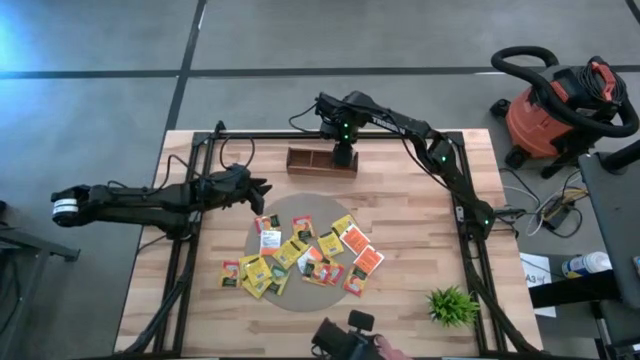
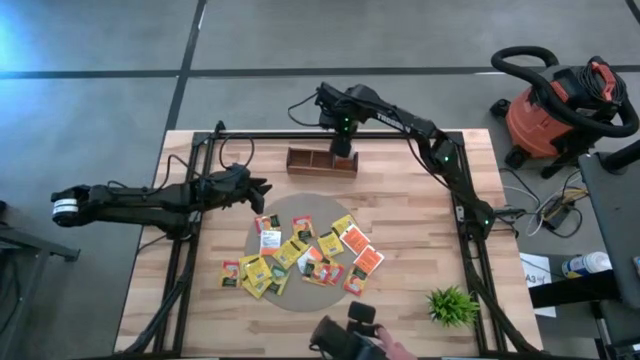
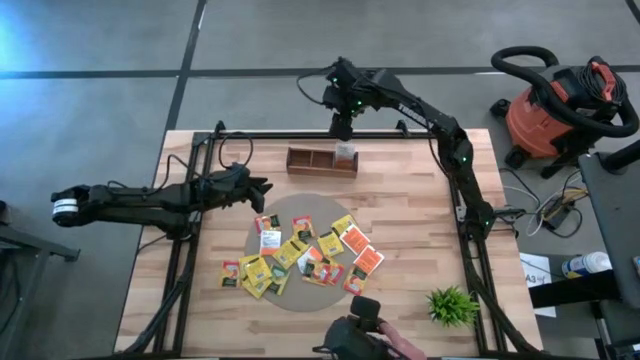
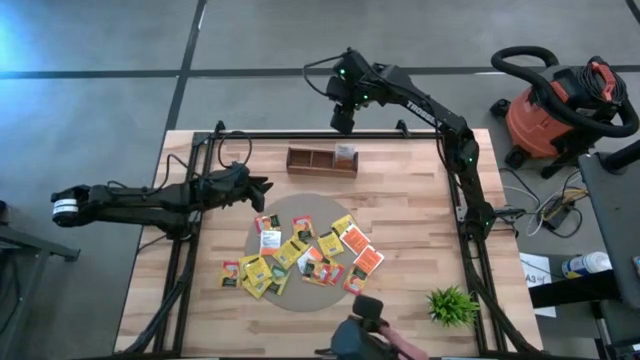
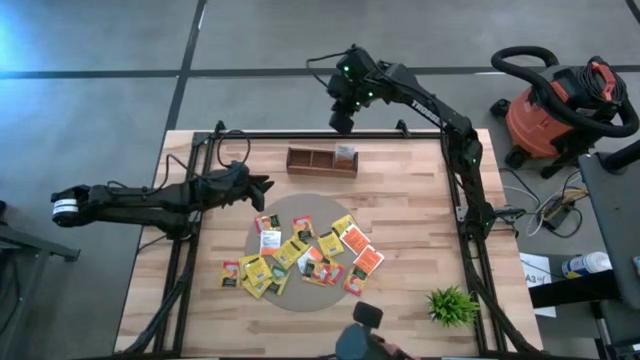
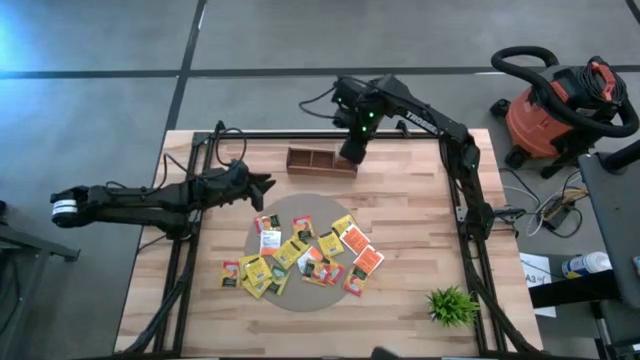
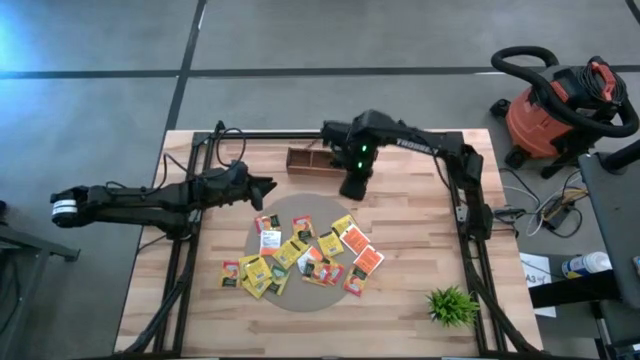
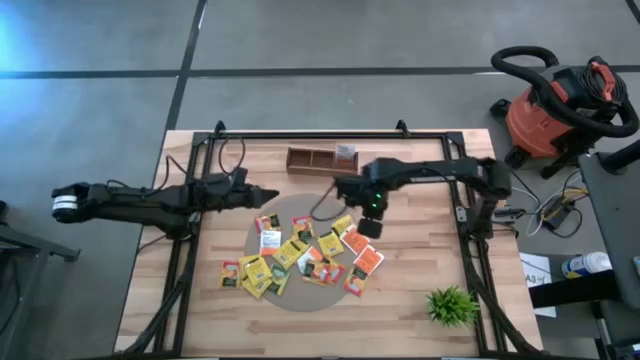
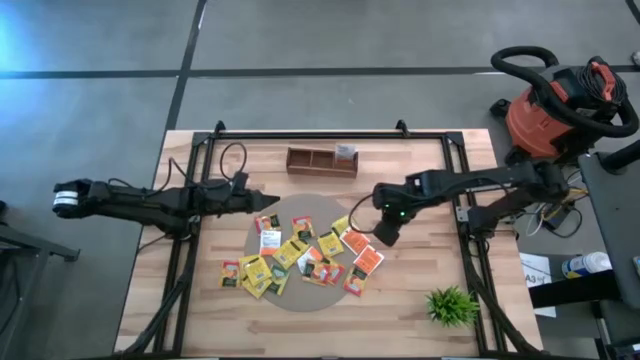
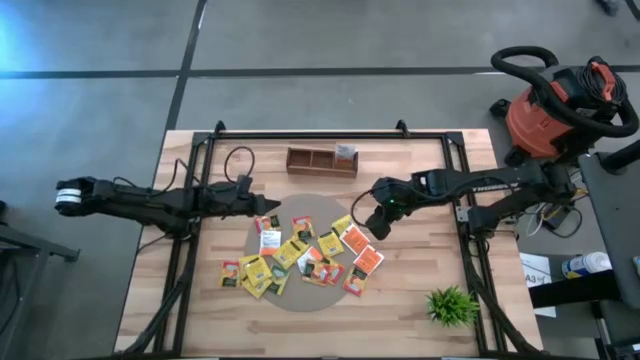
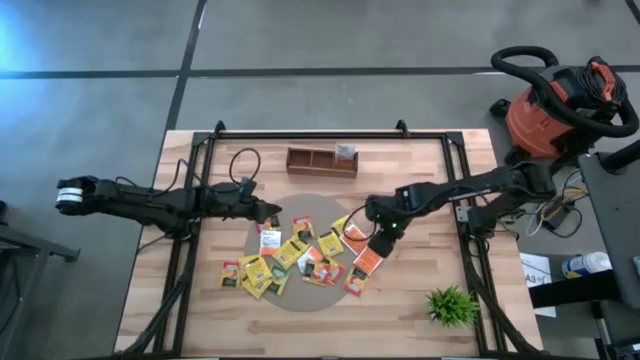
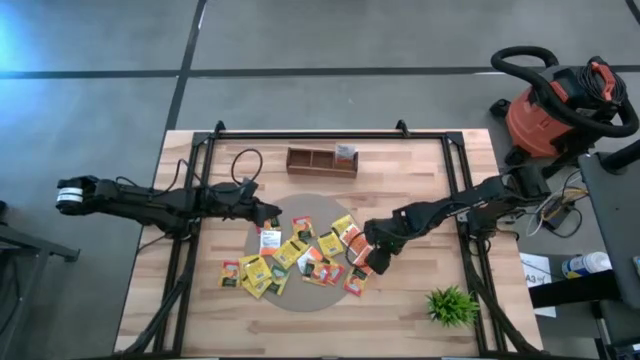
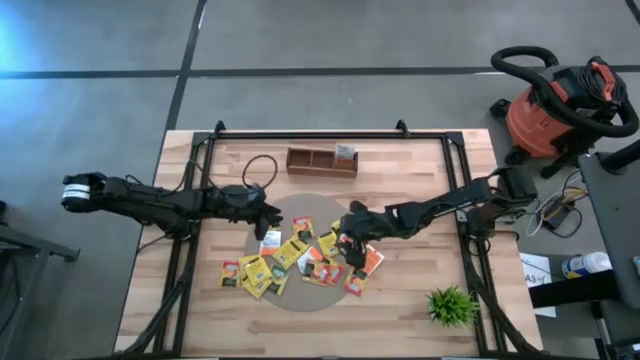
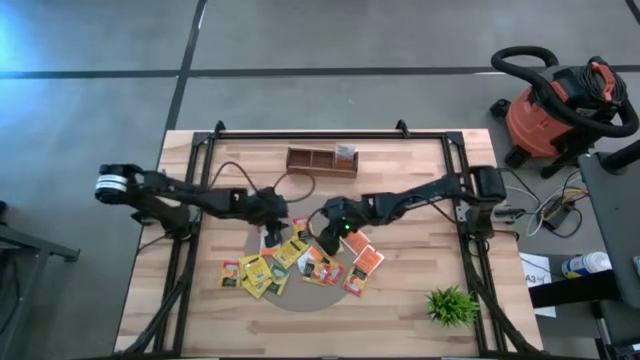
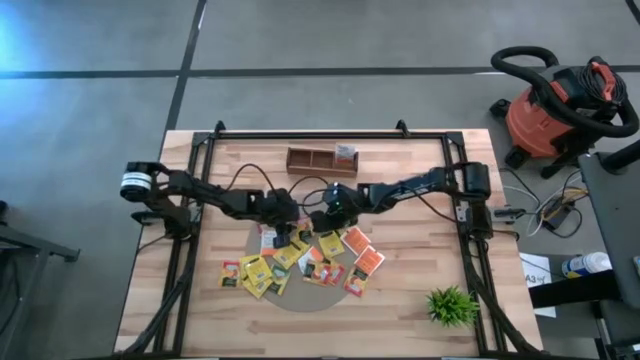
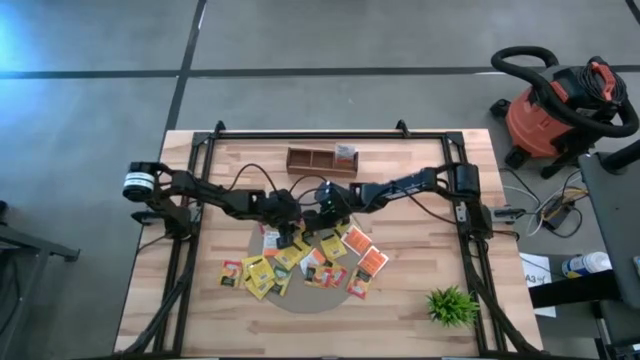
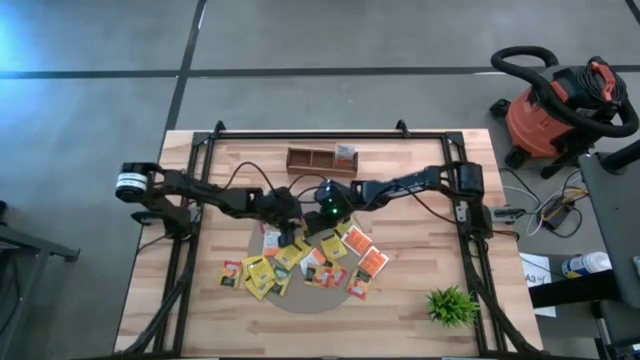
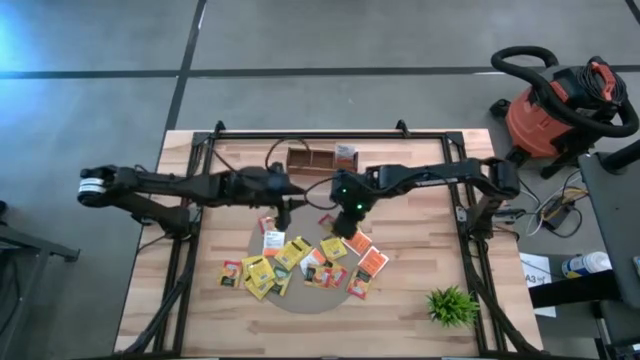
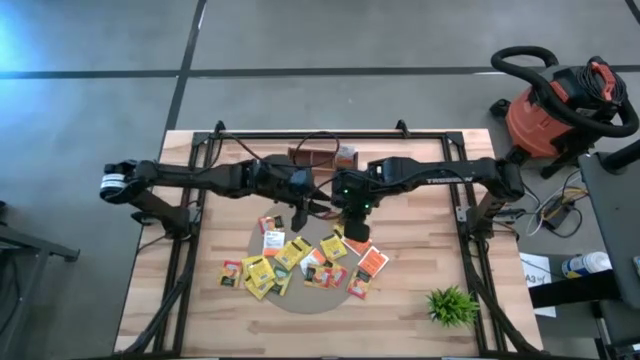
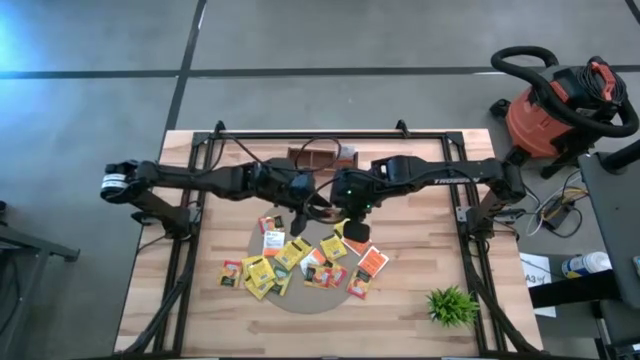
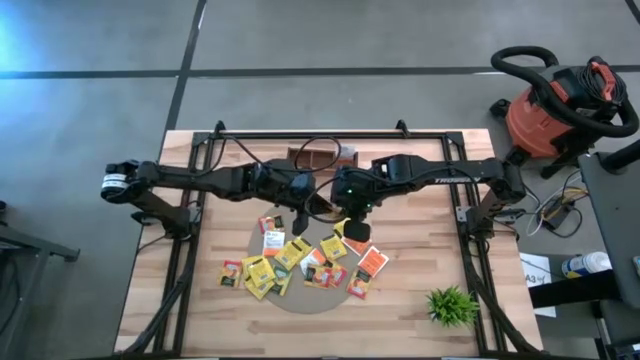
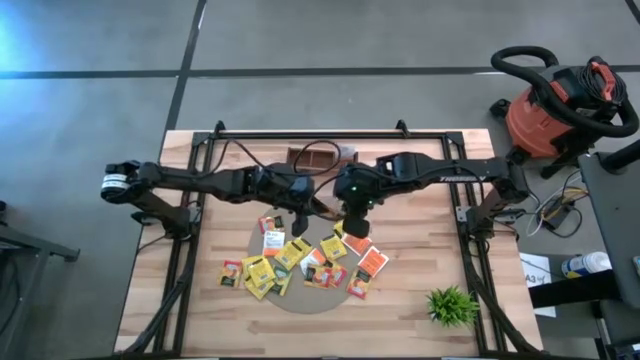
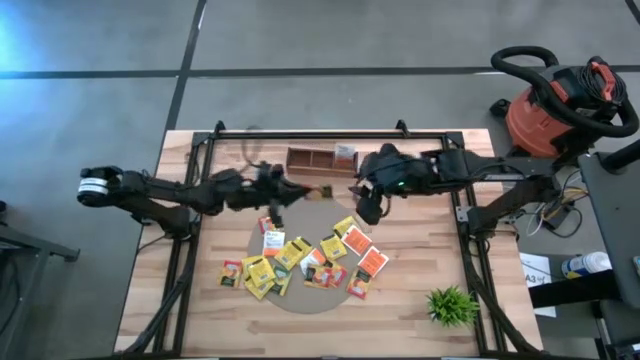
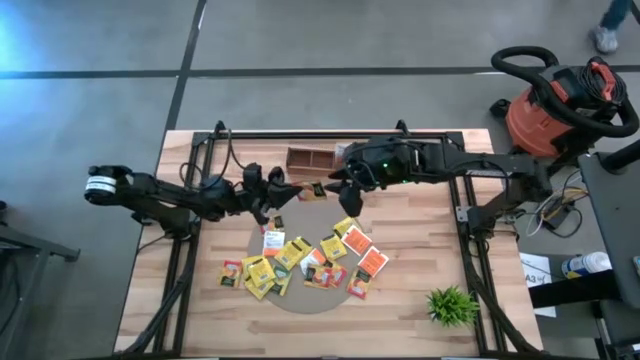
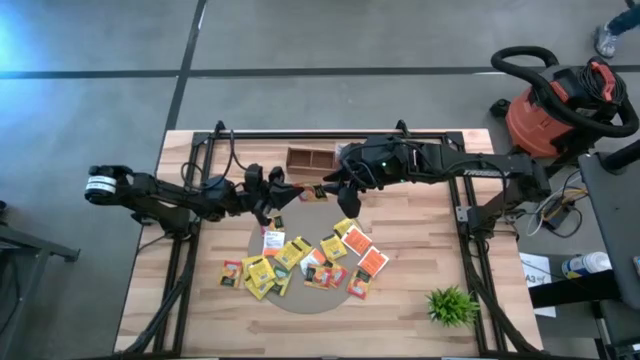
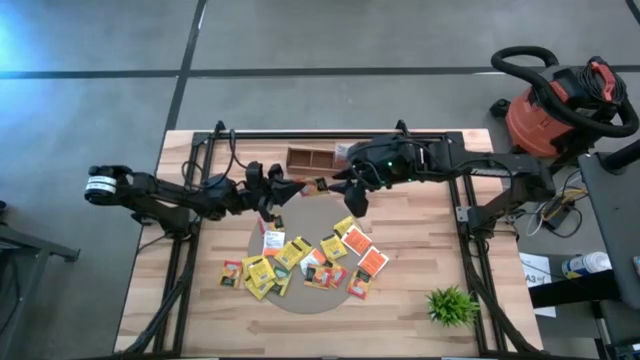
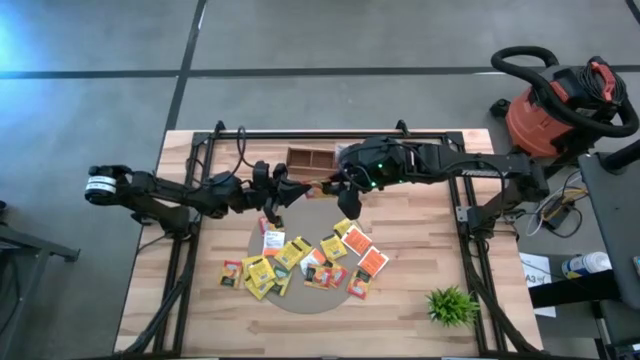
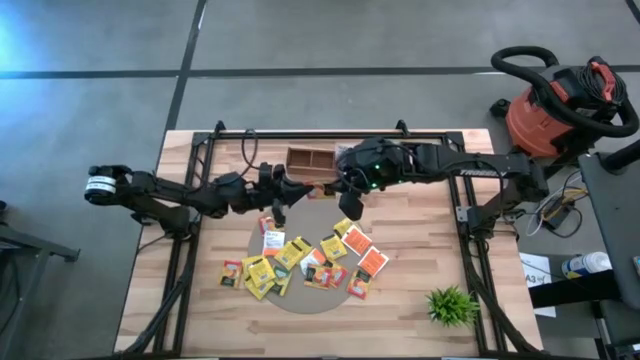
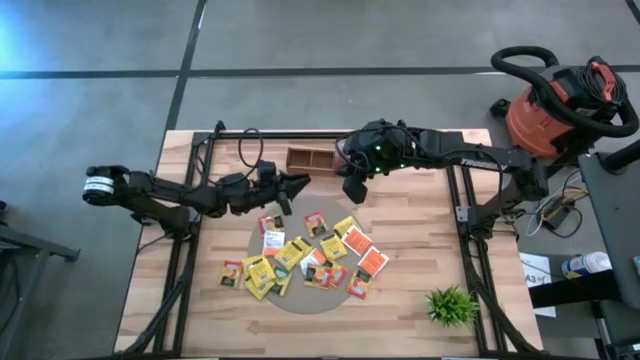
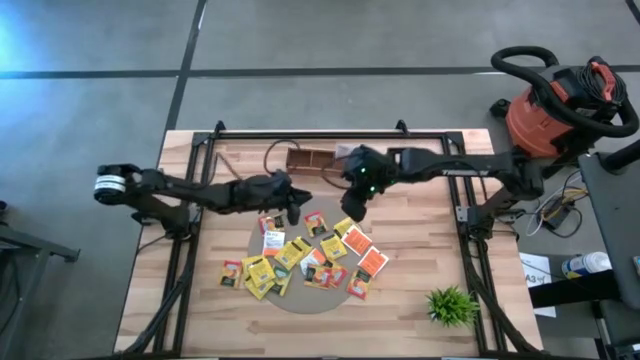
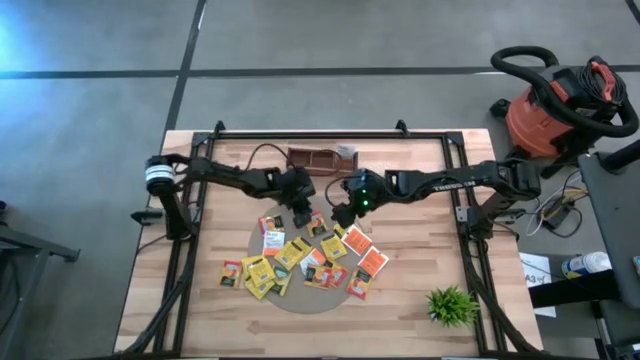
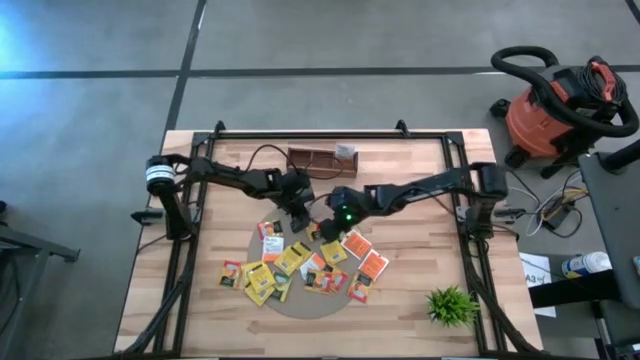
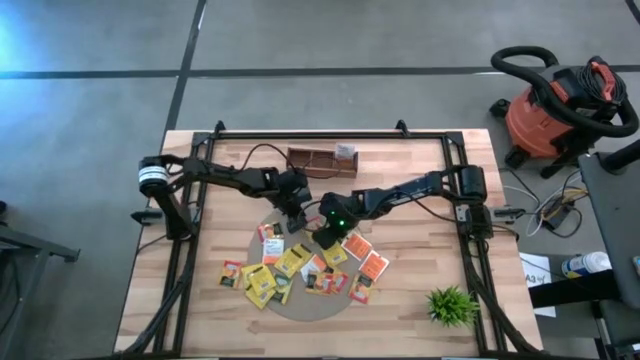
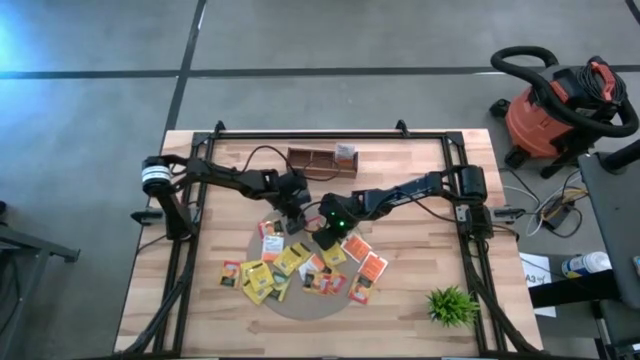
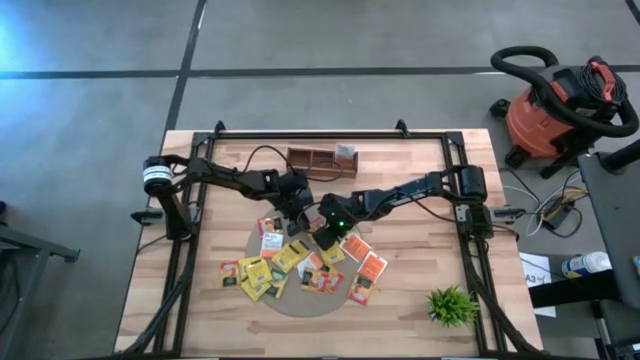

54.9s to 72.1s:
Task: Pick & Place Tea
Put the orange tea bag into the middle compartment of the wooden organizer

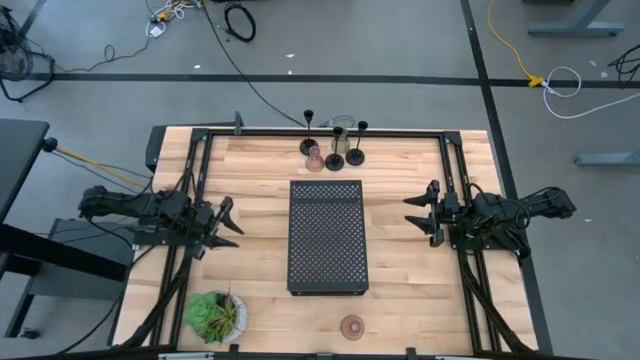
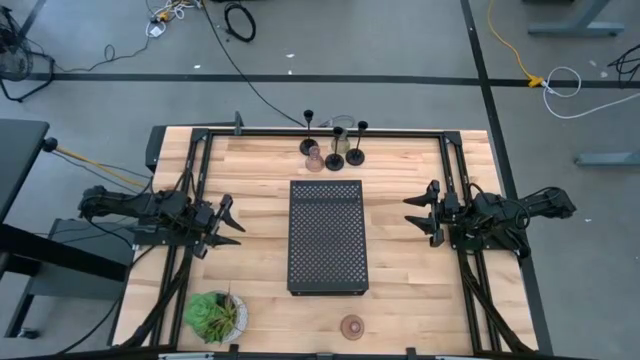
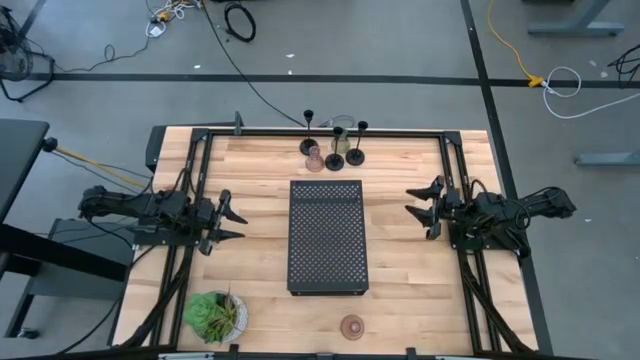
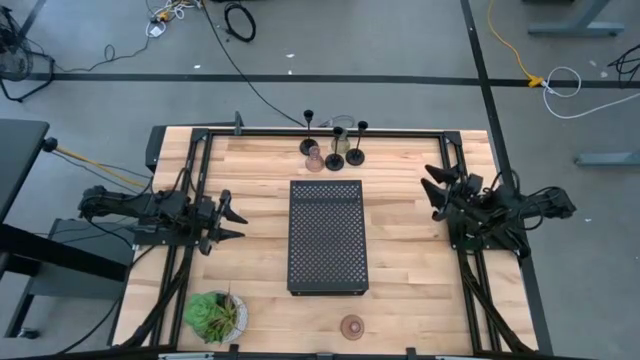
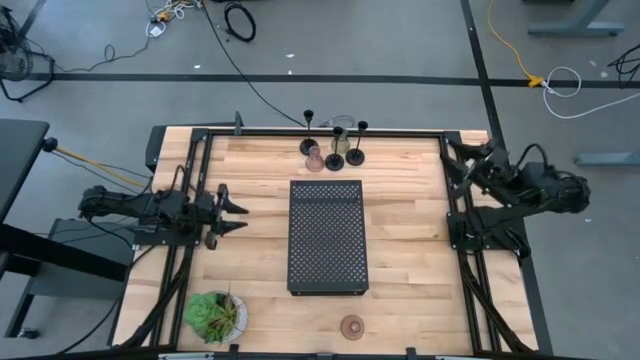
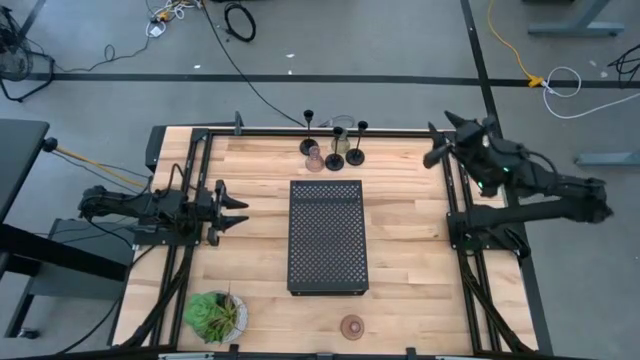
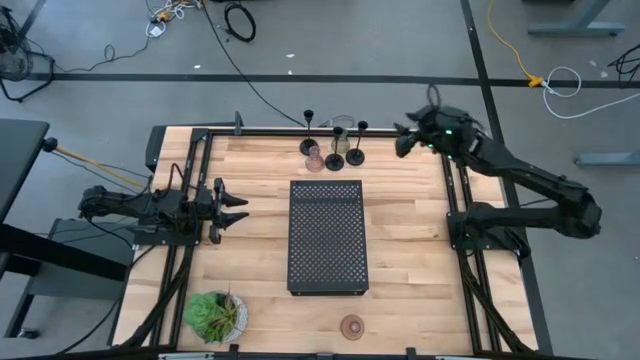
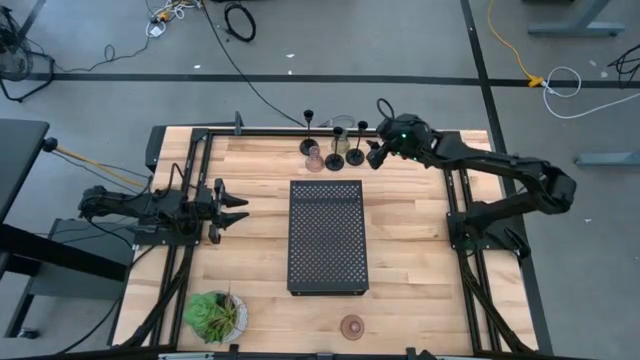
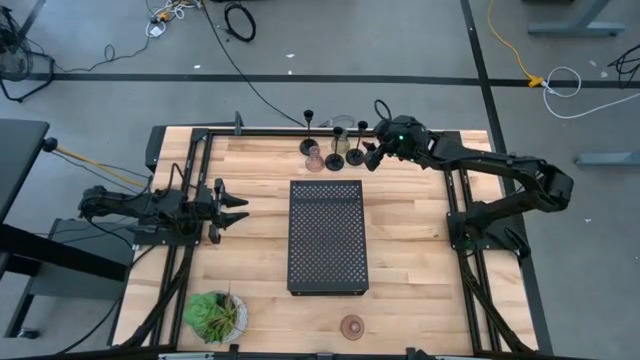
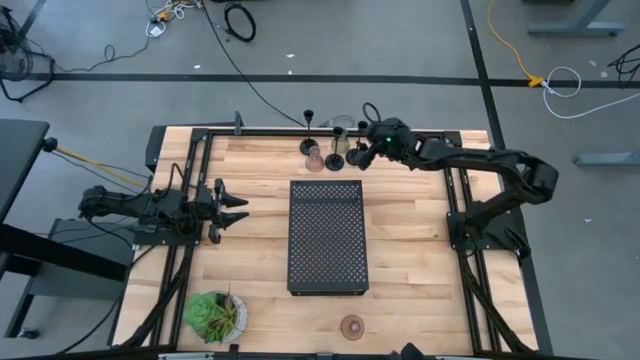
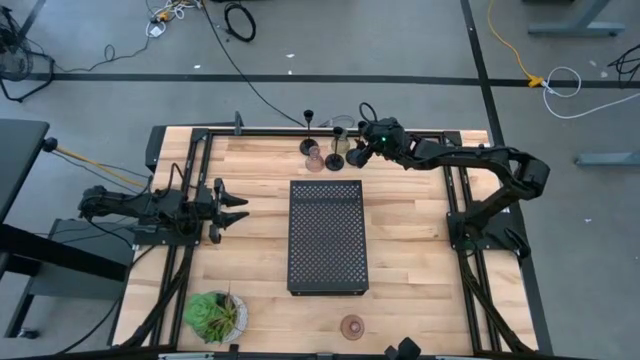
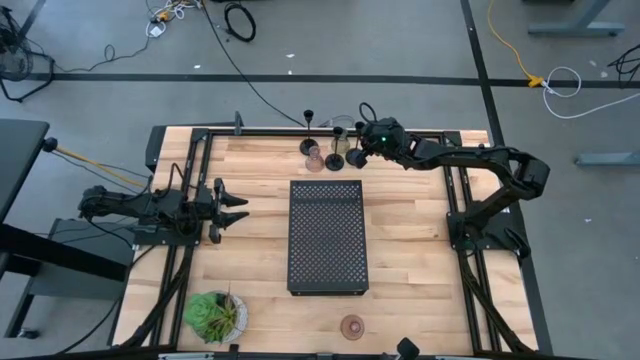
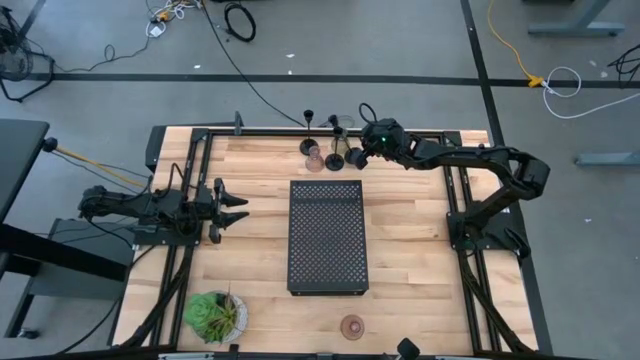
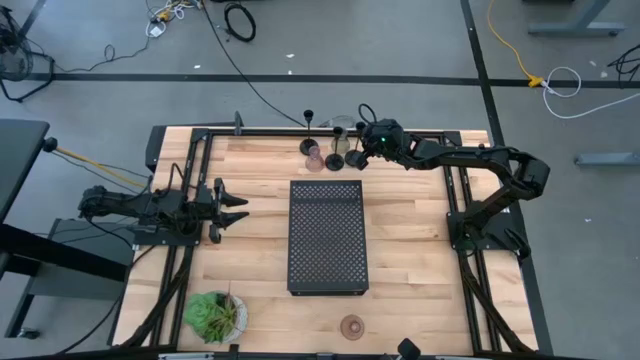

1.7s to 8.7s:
Task: Pick & Place candle stick holders
Put the right black candle holder on the shelf
